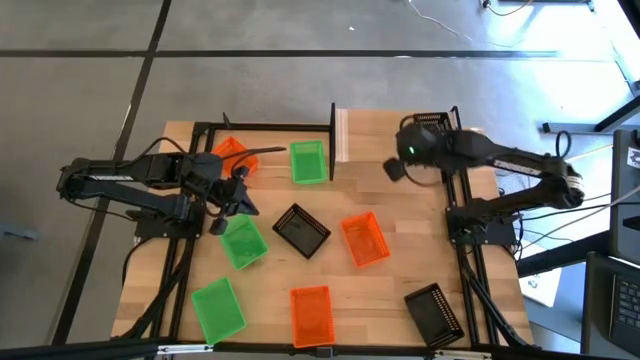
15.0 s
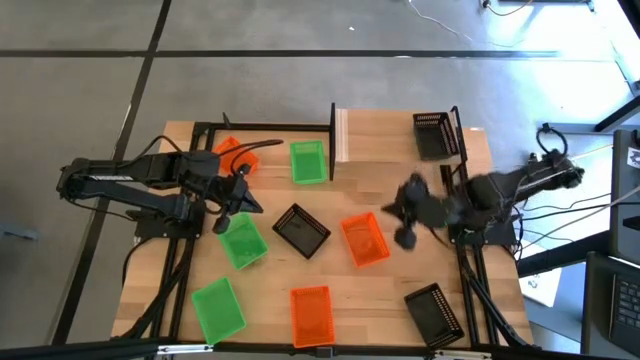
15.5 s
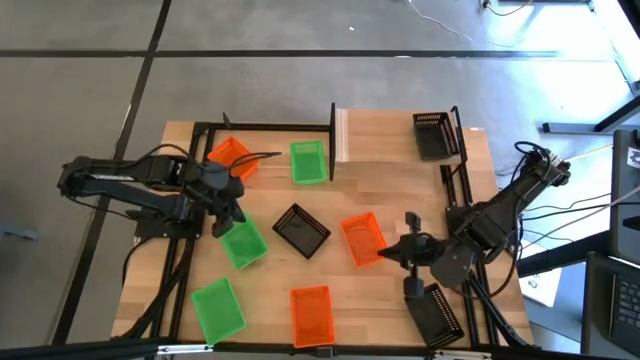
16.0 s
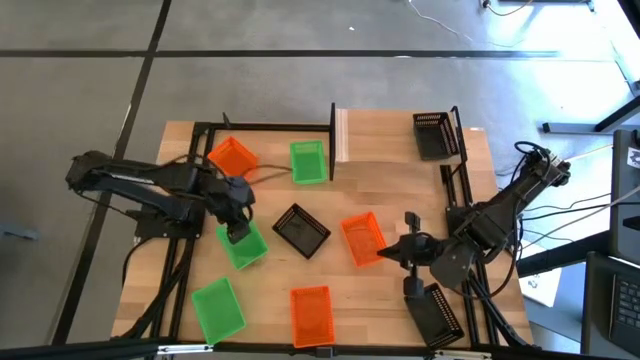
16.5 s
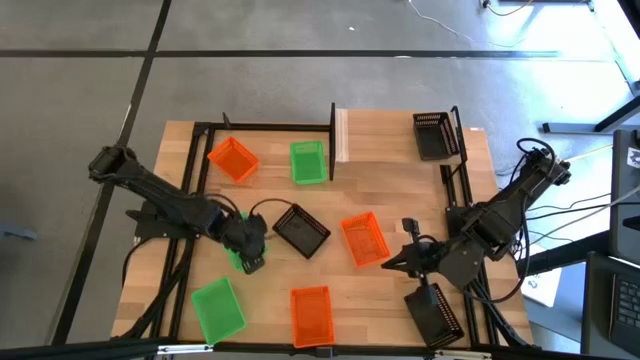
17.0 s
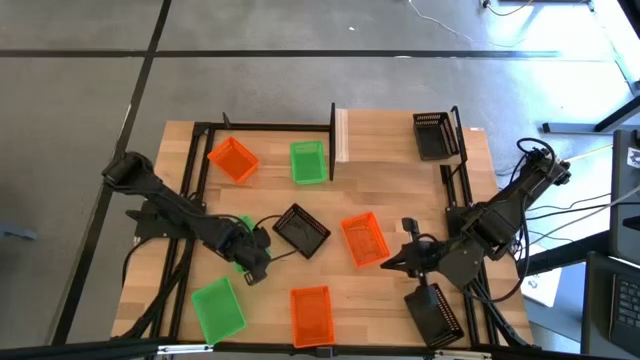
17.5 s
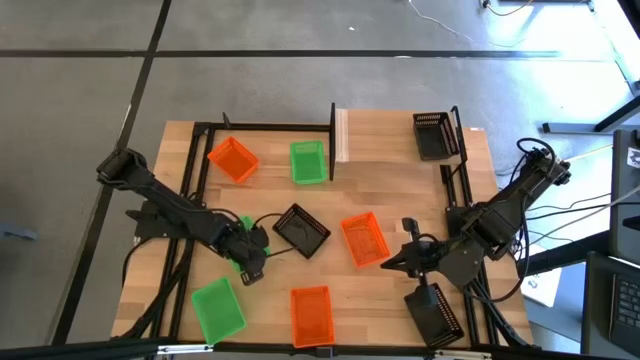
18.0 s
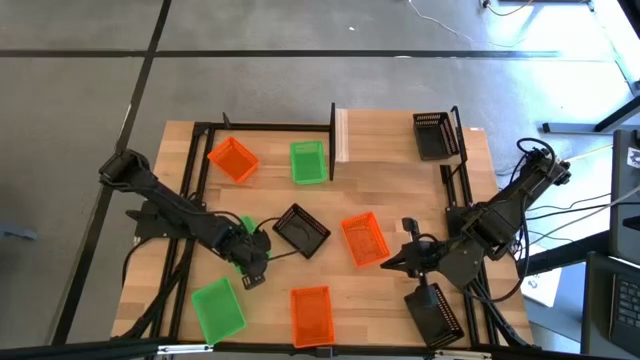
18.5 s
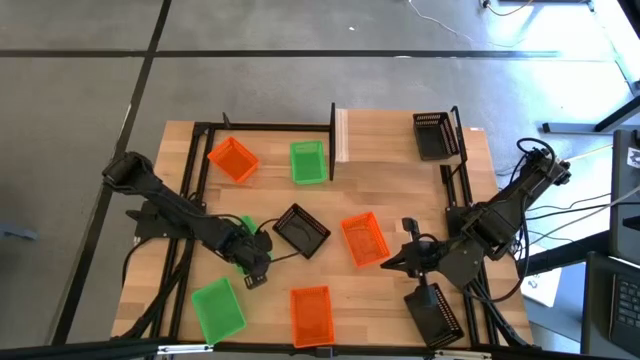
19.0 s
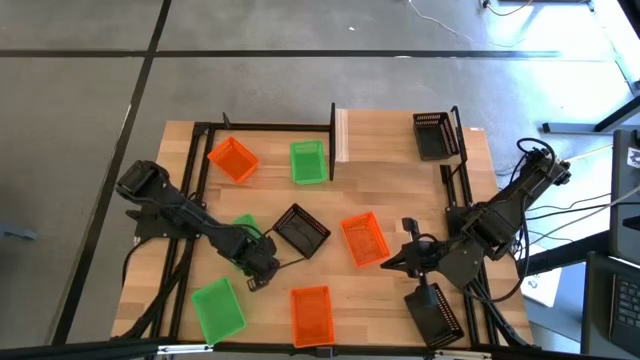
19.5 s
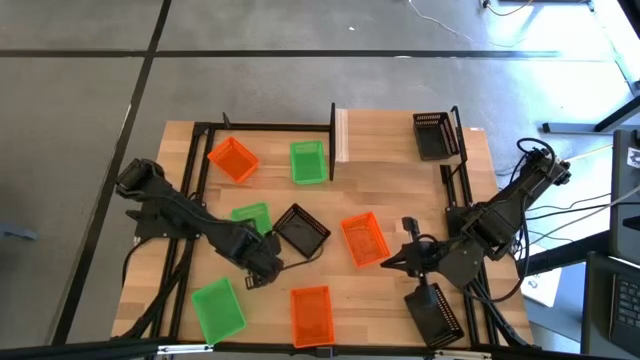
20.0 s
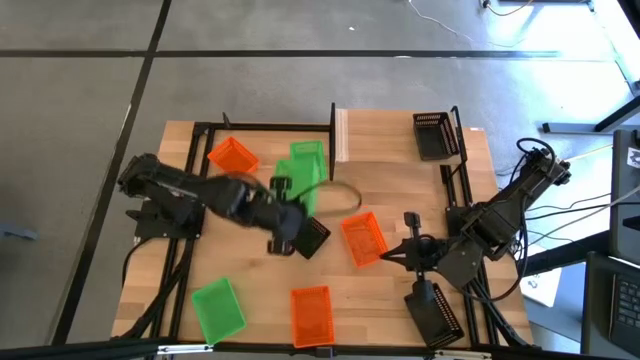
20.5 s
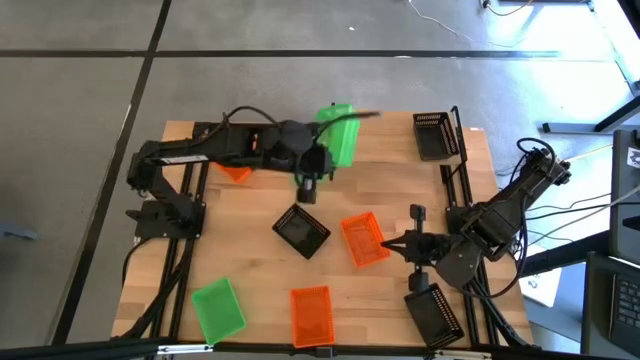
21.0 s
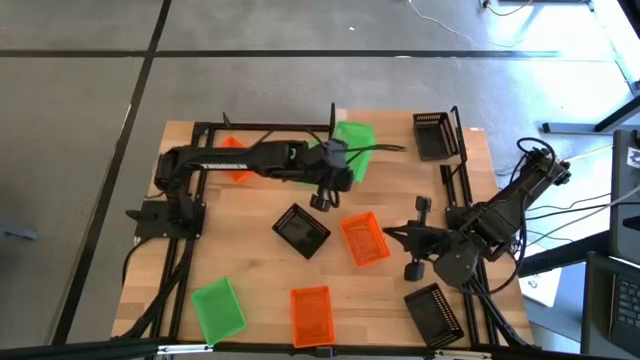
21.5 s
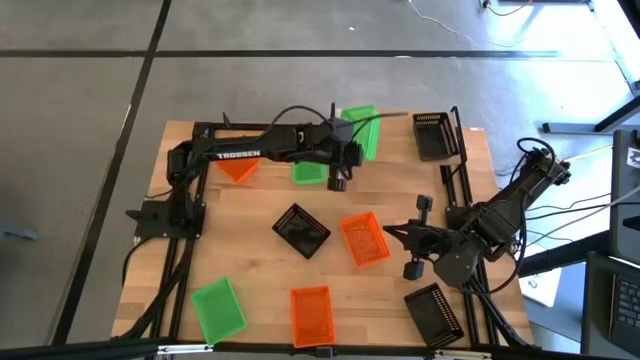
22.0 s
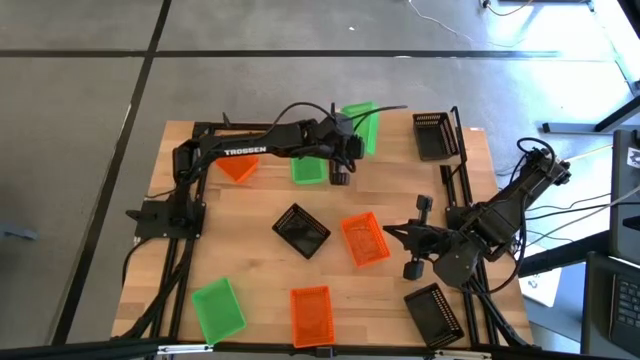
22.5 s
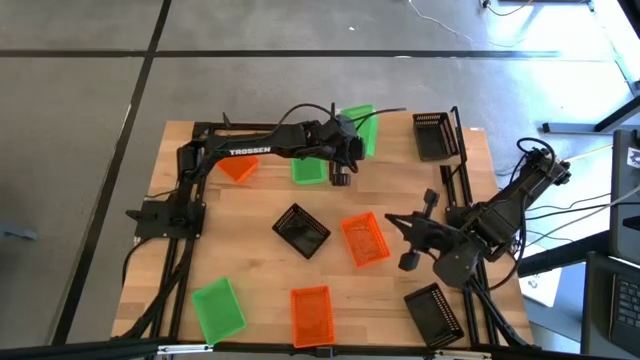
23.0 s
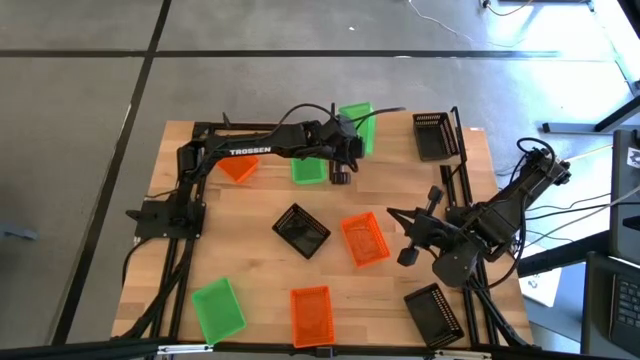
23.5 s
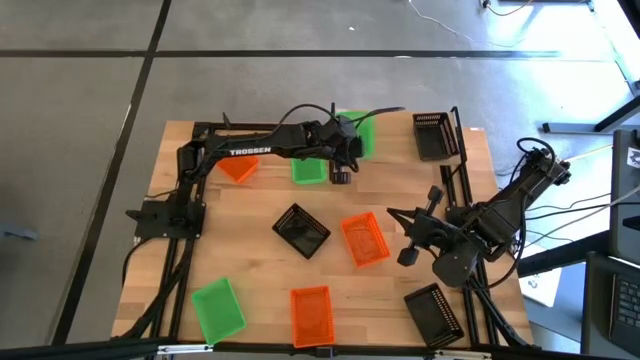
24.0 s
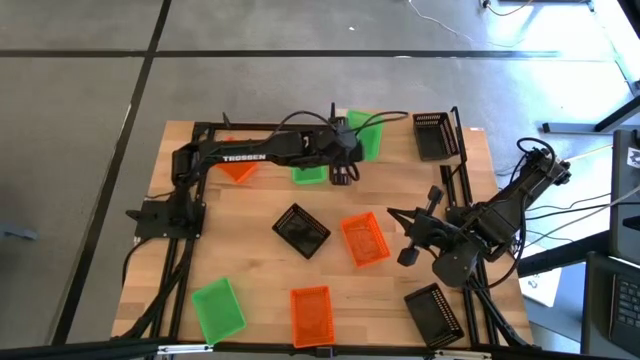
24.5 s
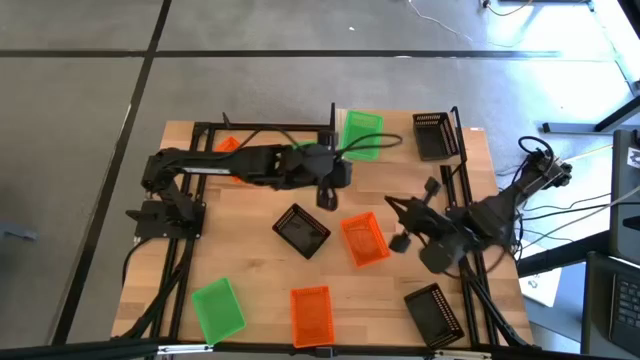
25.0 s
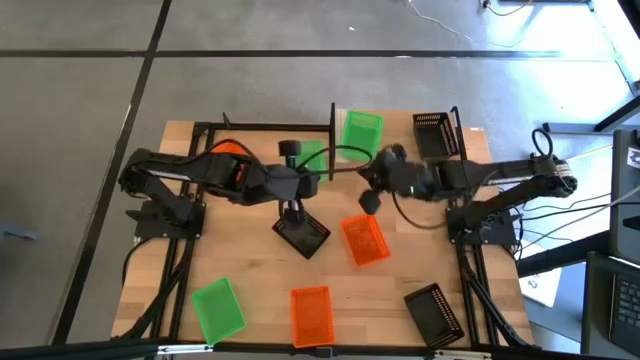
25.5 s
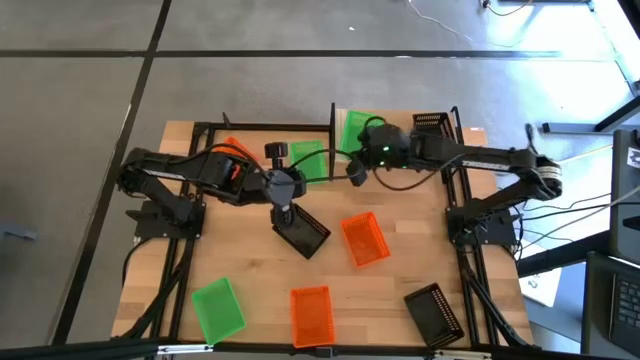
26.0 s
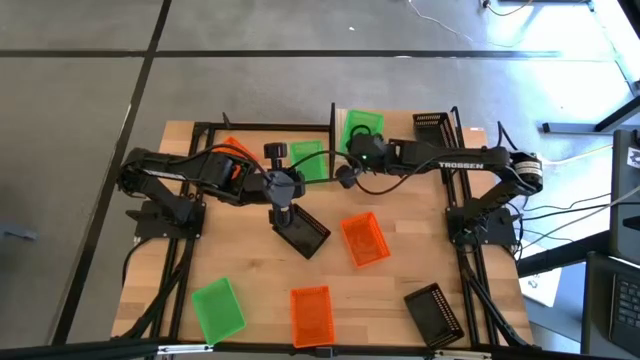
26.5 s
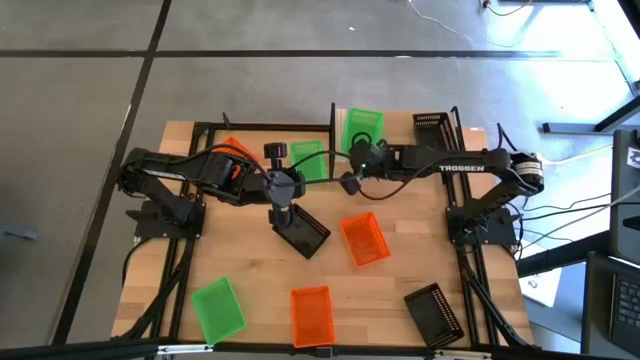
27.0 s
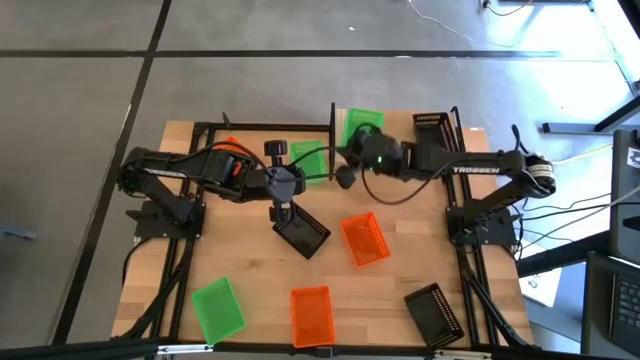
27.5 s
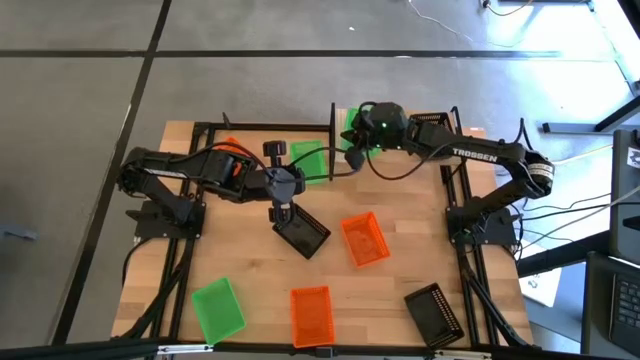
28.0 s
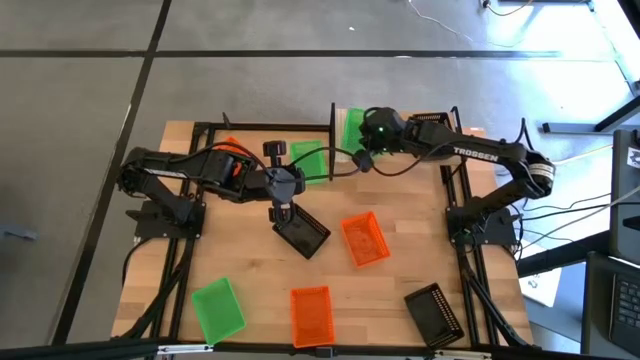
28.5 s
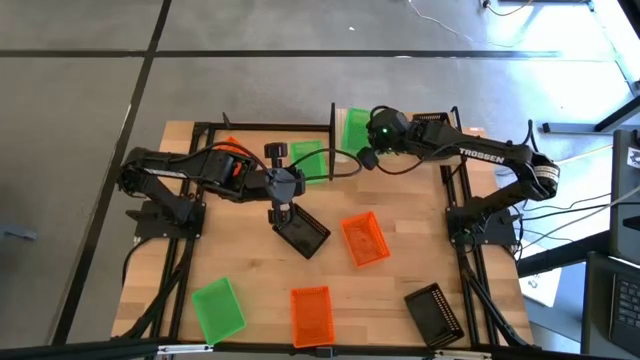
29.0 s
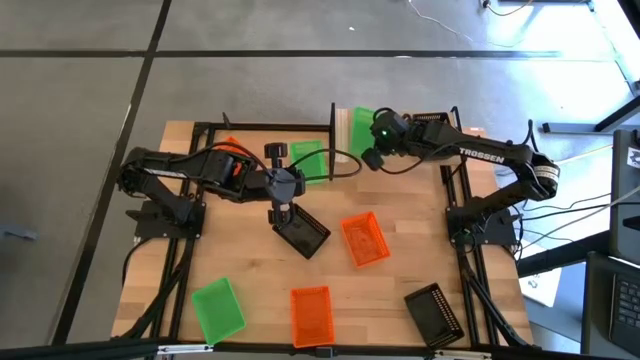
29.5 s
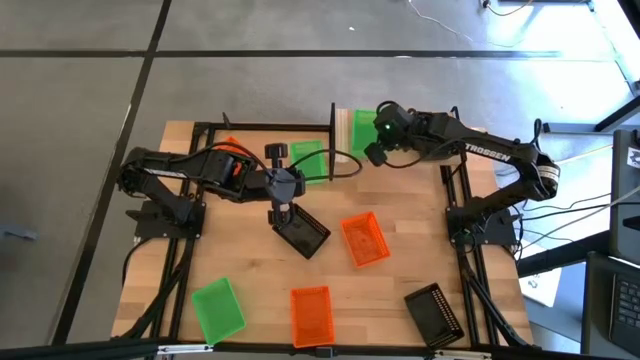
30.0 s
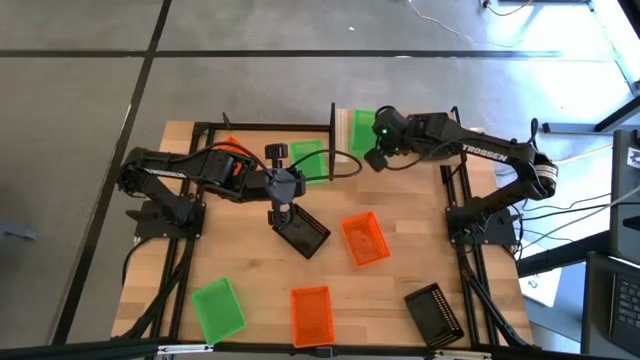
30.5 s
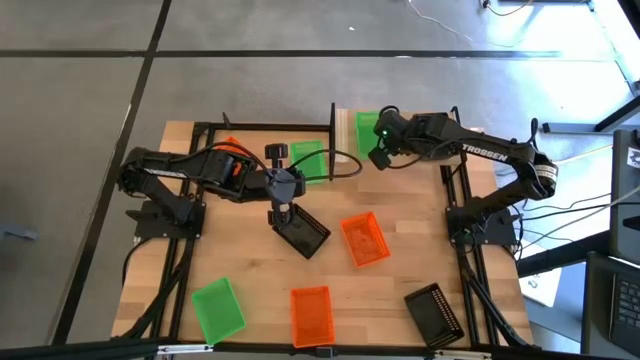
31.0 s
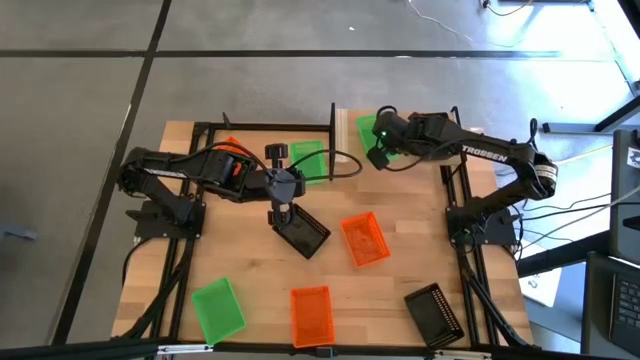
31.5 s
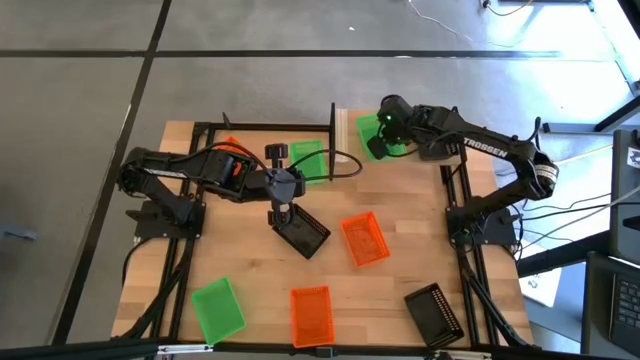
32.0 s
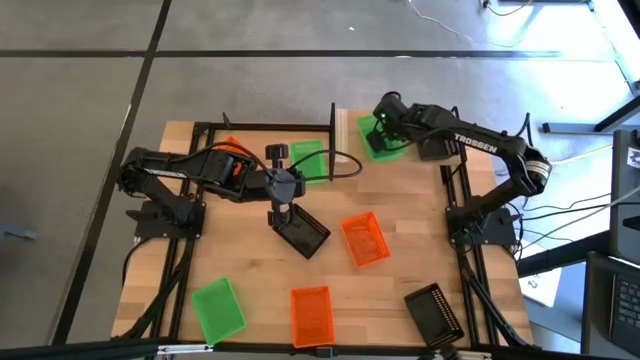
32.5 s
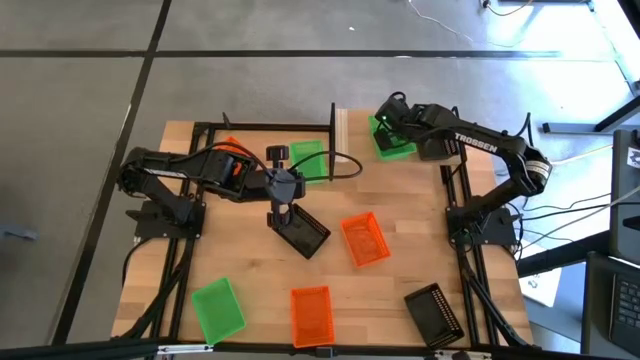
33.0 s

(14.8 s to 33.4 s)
Task: Stack baskets on shelf by color
Put the middle green bin on the shelf

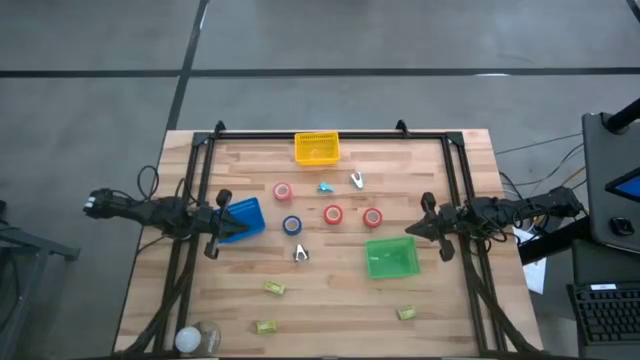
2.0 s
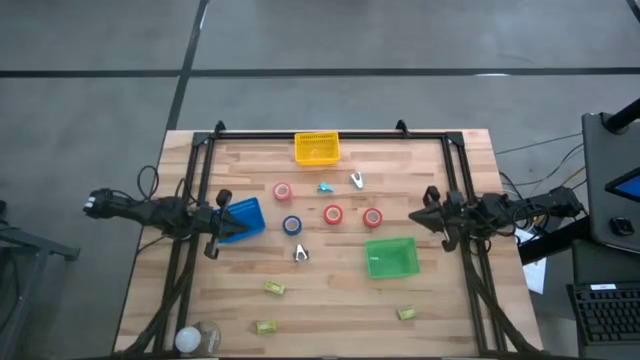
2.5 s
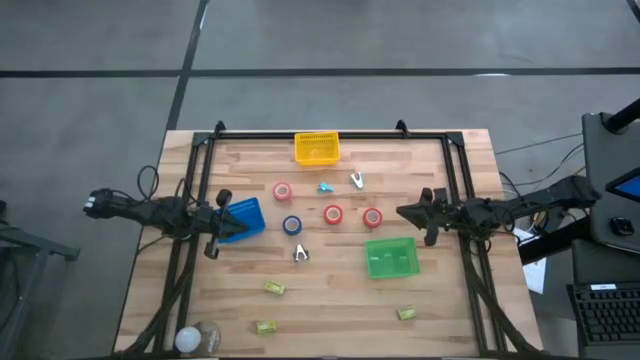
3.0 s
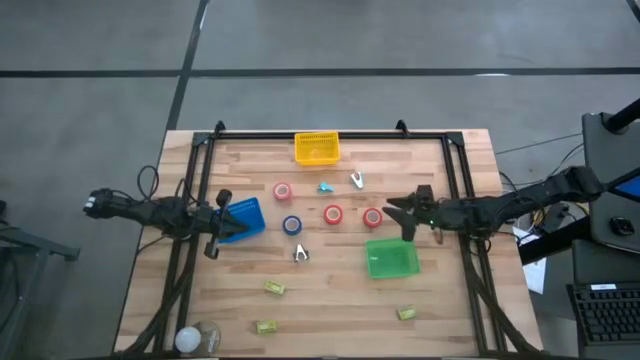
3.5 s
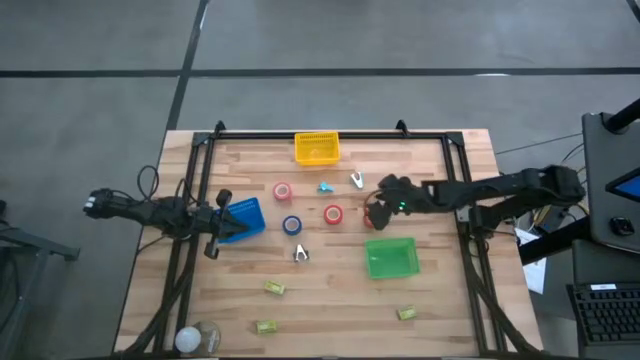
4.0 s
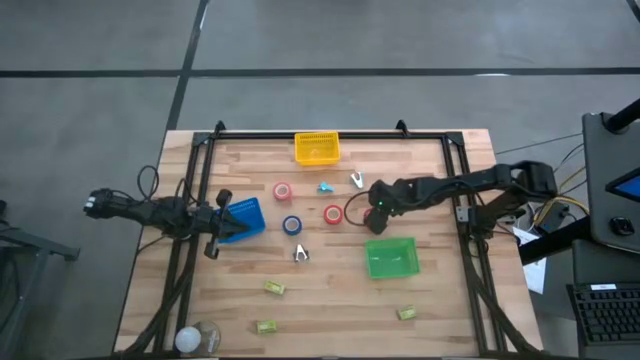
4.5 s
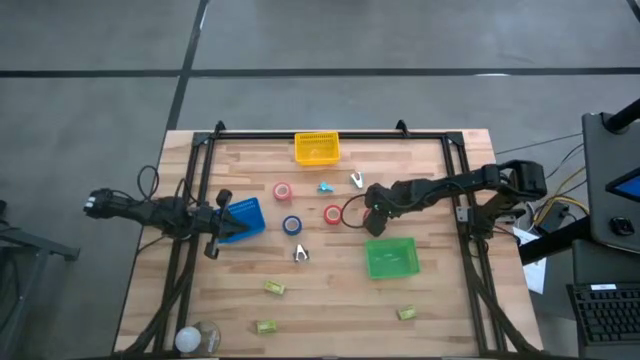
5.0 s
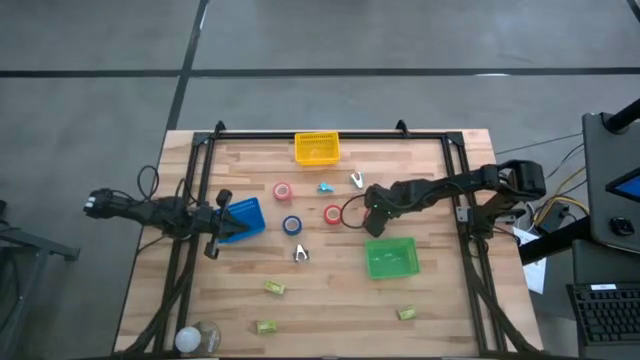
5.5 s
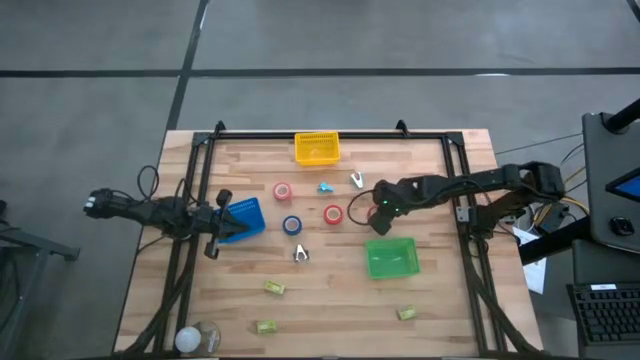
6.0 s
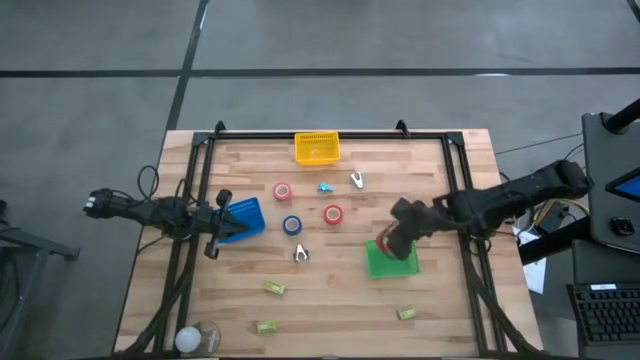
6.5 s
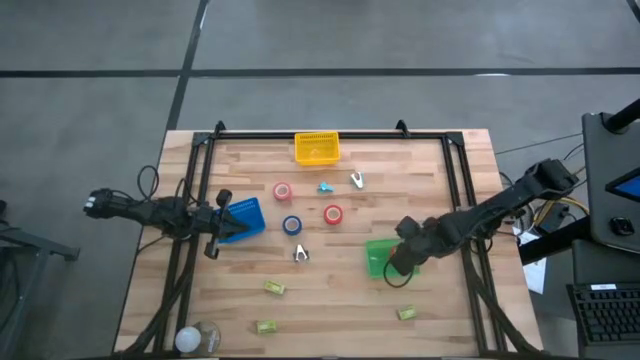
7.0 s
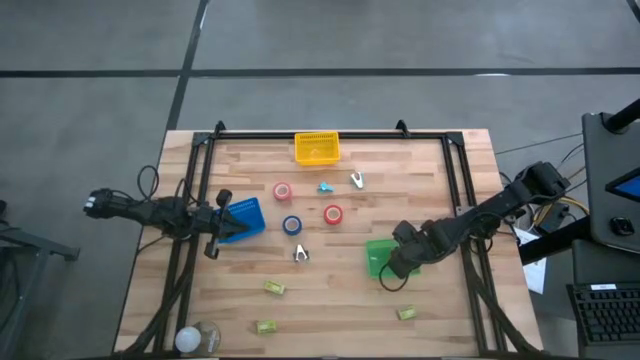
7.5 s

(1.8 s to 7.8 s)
Task: Pick and place Stapler, Stapler remover, tape
Put the right orange tape into the green bin
